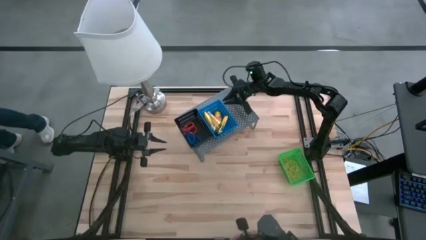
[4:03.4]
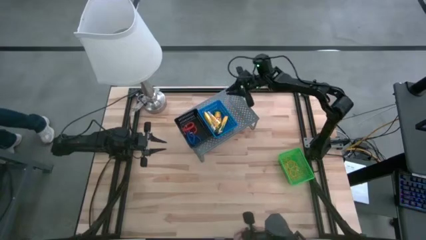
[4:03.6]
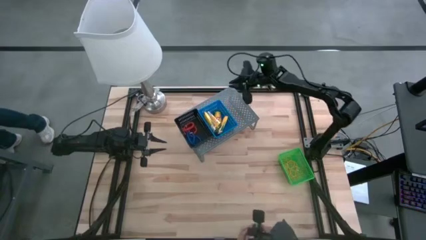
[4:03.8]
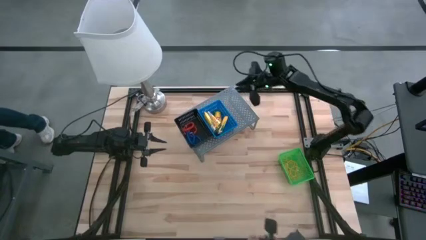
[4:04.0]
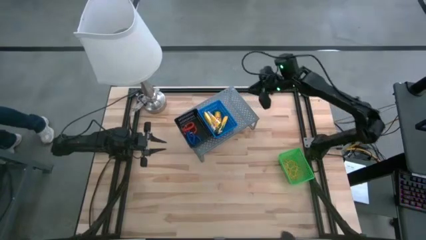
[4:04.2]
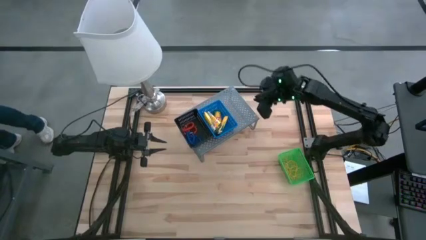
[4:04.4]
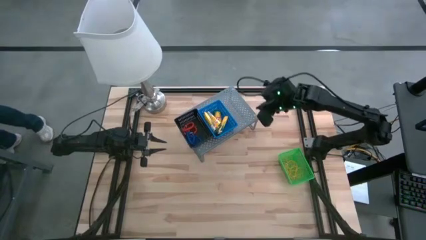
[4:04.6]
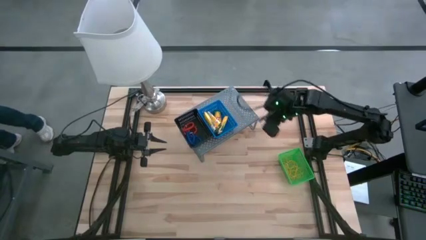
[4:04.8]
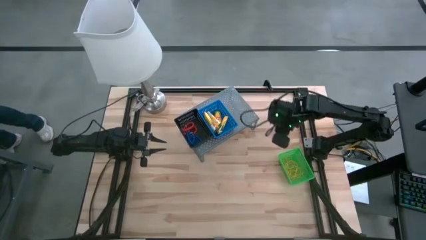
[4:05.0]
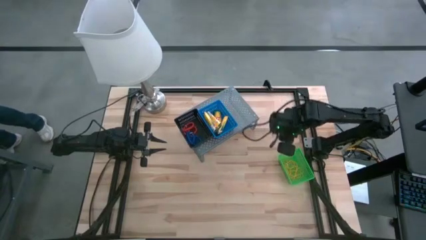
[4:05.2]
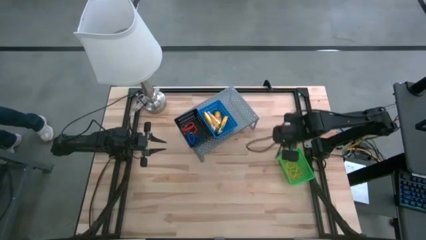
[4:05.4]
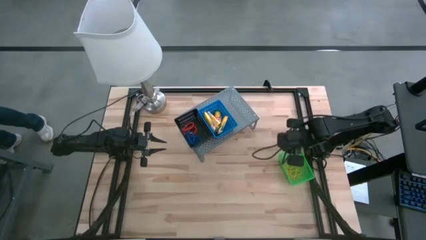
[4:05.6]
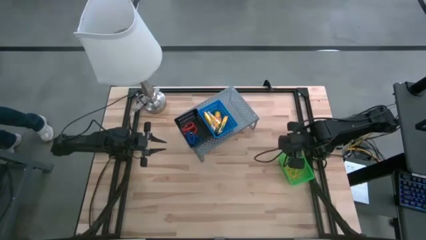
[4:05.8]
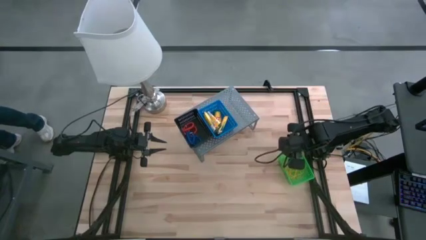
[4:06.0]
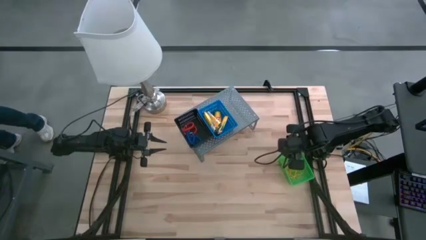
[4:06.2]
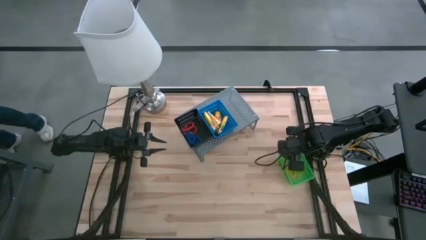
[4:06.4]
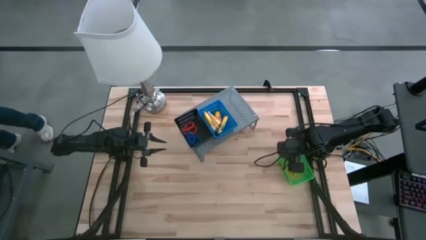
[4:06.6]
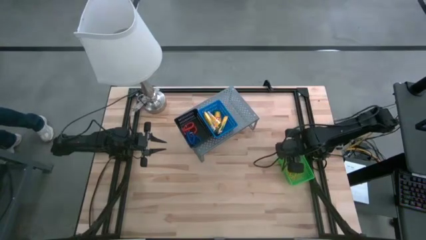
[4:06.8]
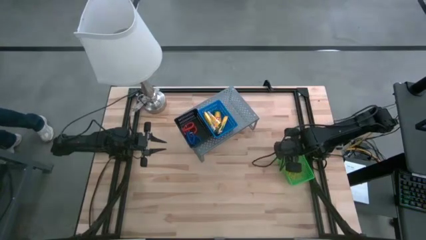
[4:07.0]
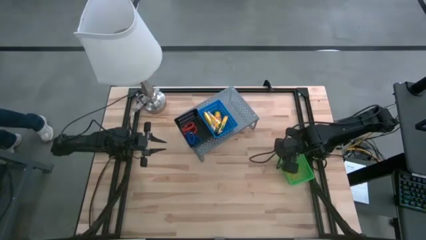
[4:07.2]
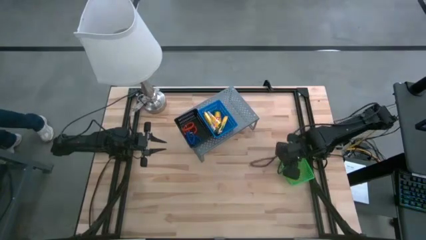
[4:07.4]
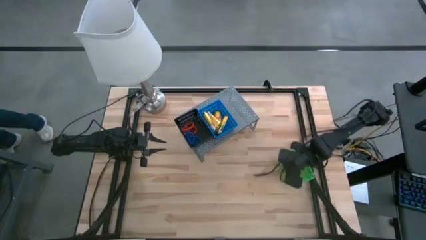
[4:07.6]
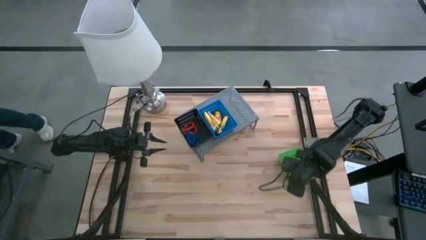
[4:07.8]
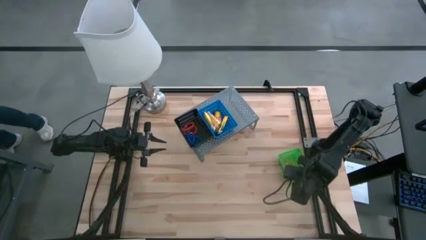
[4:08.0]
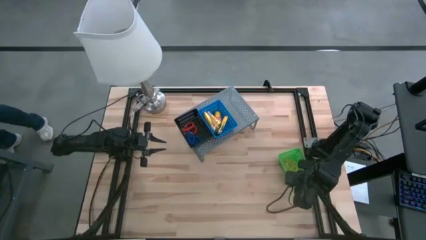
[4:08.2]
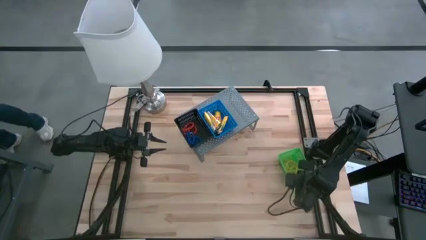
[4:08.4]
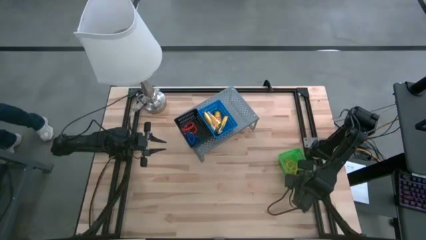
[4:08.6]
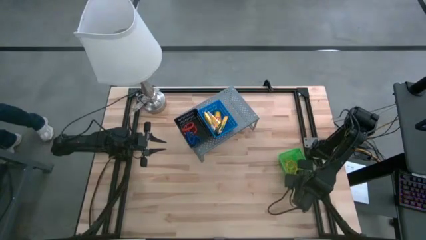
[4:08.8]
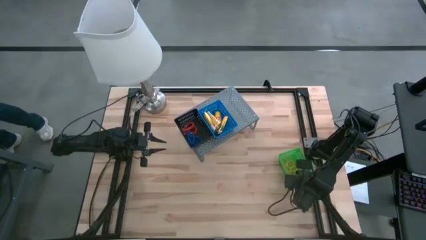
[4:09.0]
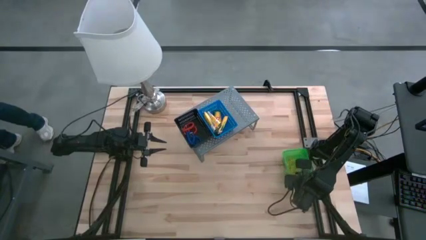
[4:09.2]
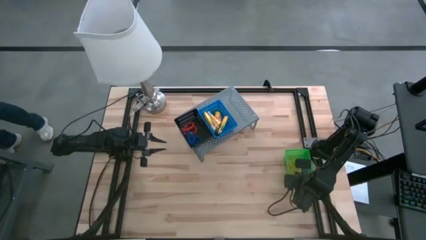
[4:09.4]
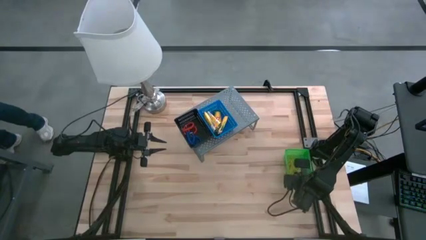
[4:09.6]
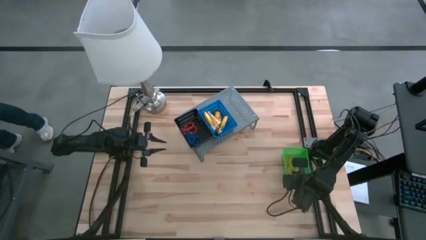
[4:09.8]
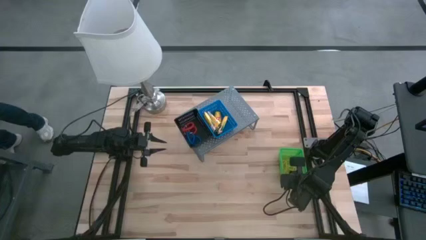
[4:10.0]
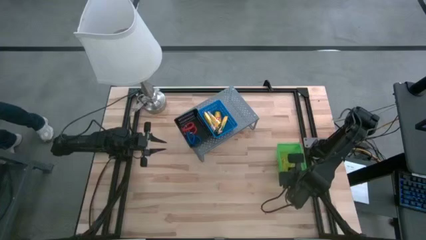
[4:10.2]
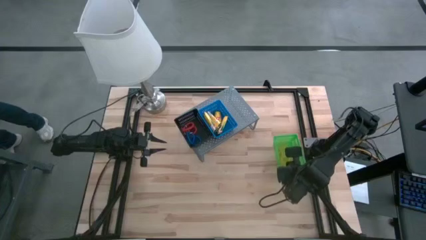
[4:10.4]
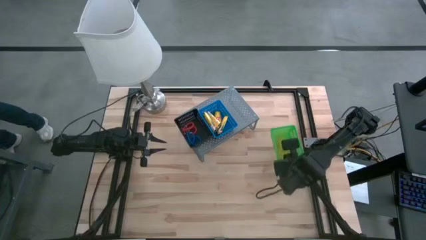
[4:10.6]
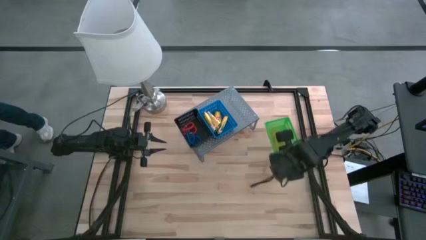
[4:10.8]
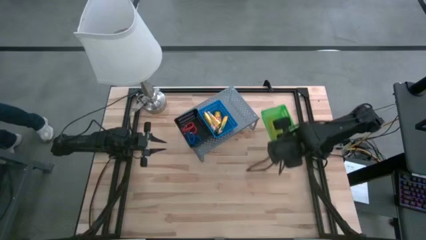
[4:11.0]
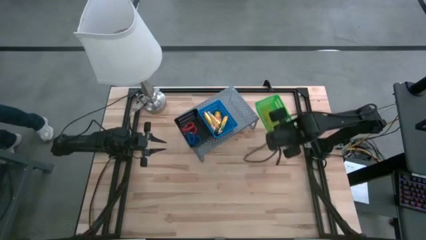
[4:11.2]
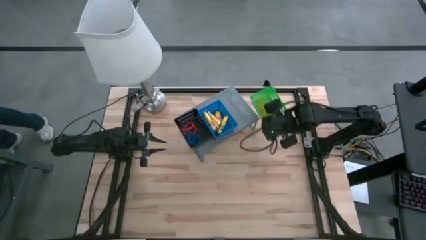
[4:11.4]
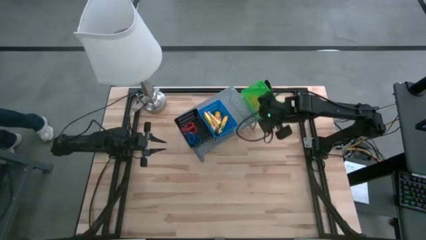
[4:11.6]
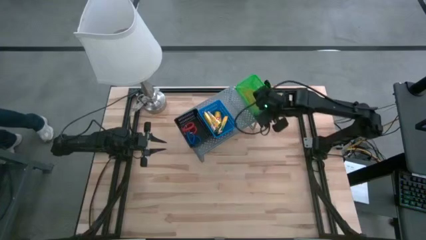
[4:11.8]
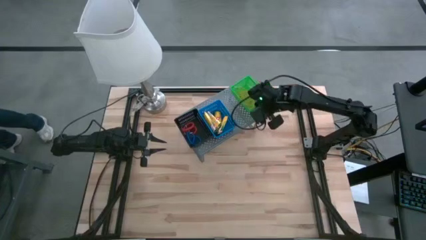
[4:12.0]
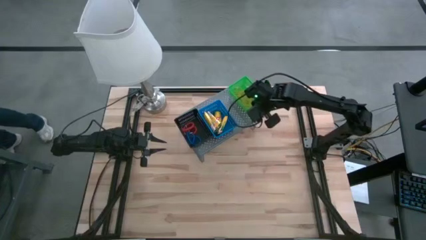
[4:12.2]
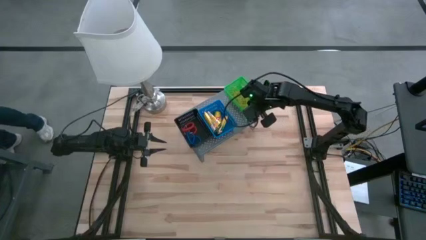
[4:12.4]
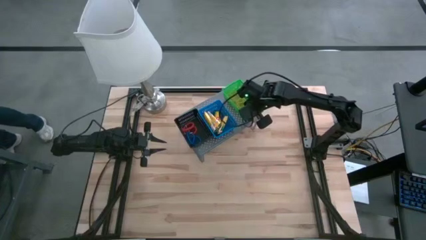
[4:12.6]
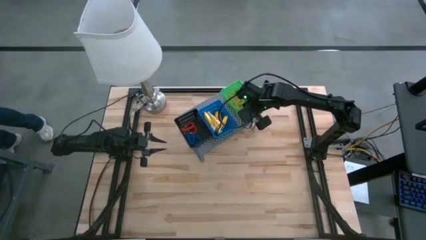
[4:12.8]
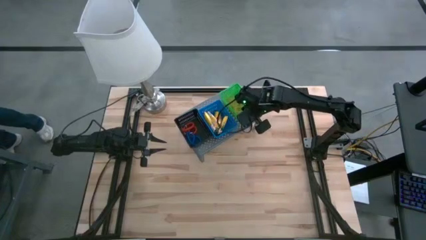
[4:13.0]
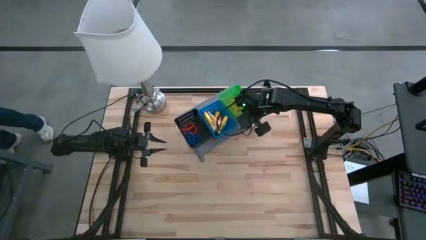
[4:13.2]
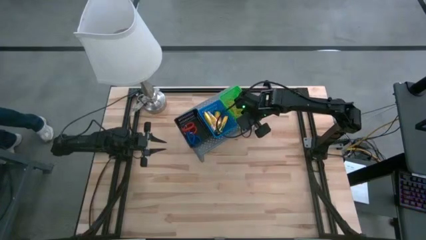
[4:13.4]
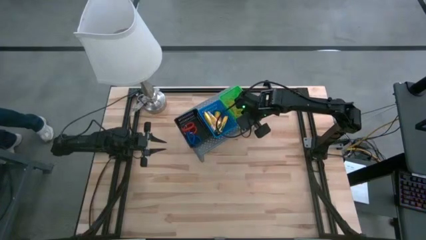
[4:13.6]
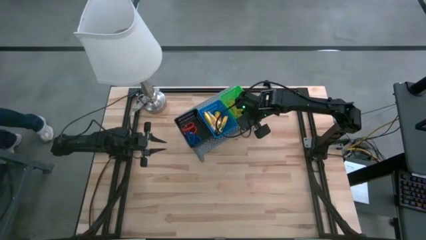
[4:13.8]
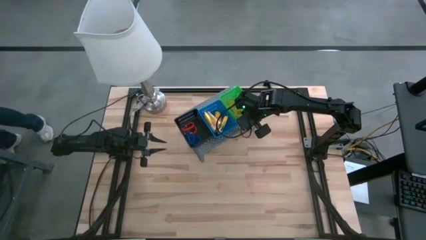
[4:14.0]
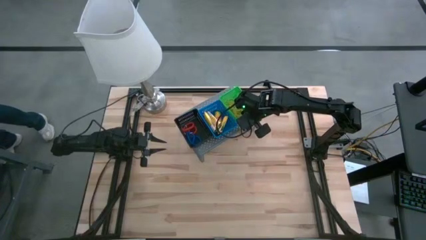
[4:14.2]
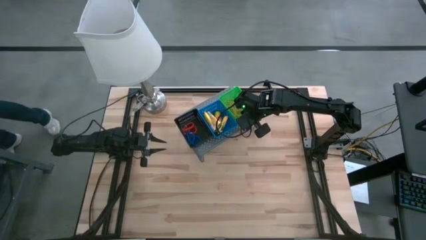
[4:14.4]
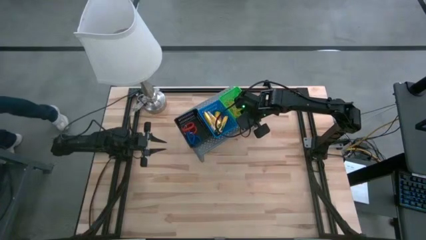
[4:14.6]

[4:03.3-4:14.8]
Task: Pick & Place Office Desk Supplies
Put the green basket filled with rubber bands on the shelf
